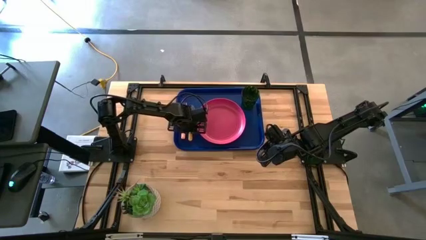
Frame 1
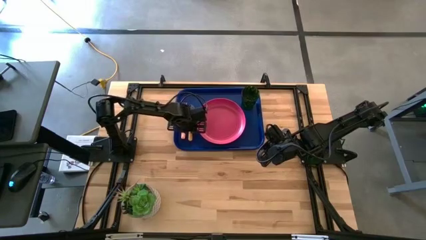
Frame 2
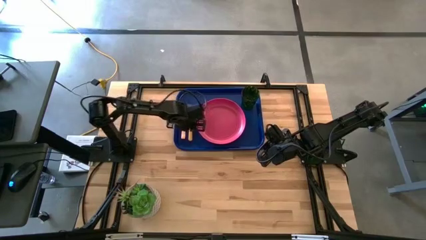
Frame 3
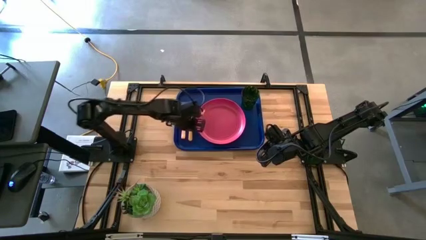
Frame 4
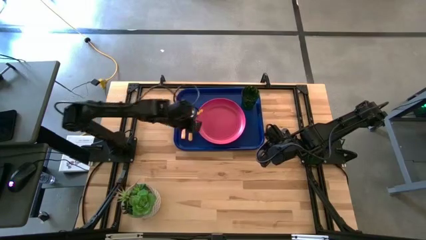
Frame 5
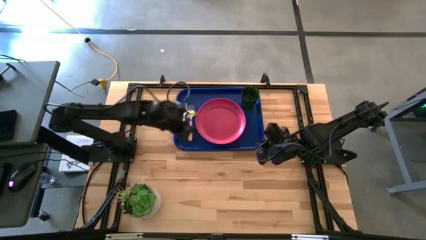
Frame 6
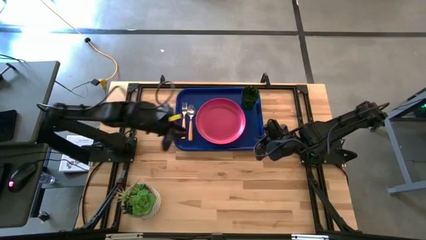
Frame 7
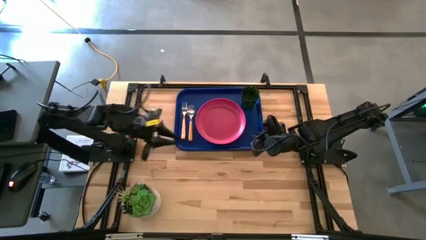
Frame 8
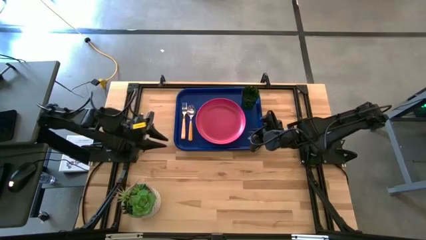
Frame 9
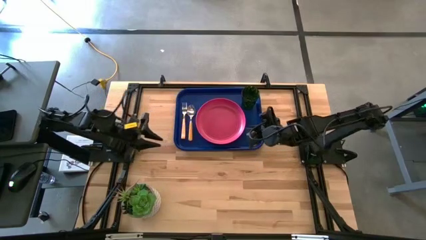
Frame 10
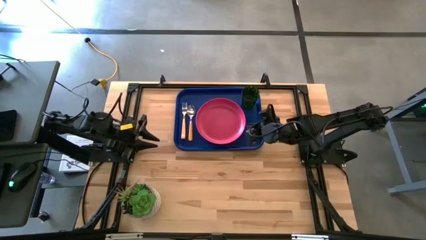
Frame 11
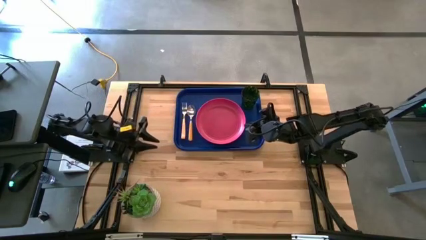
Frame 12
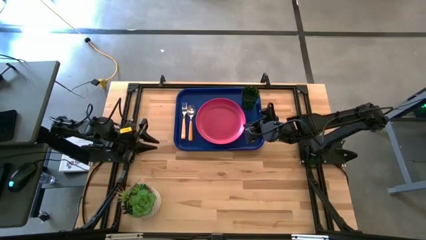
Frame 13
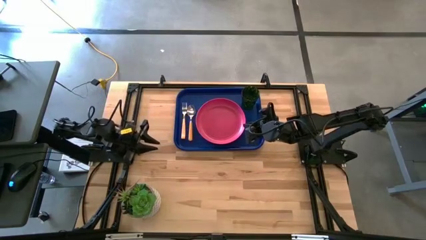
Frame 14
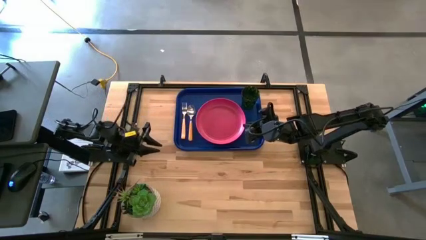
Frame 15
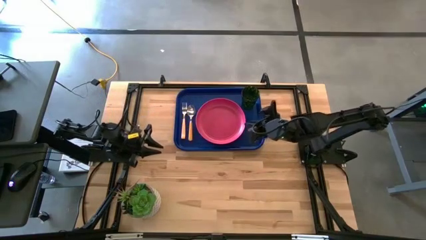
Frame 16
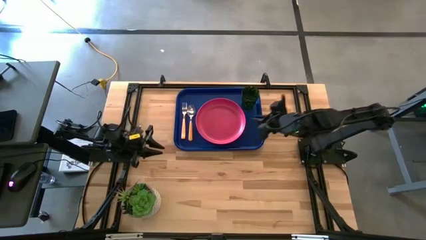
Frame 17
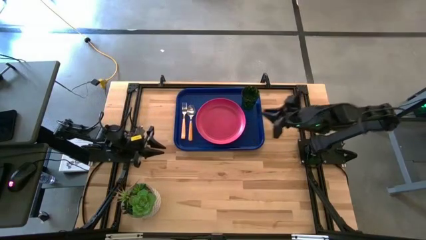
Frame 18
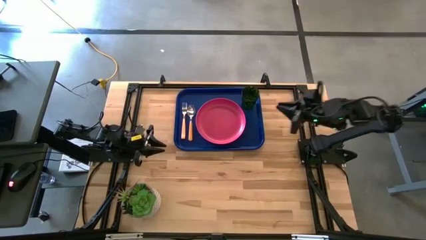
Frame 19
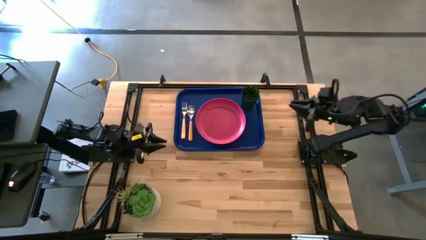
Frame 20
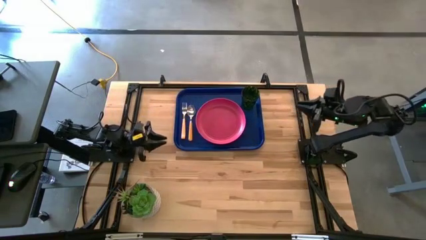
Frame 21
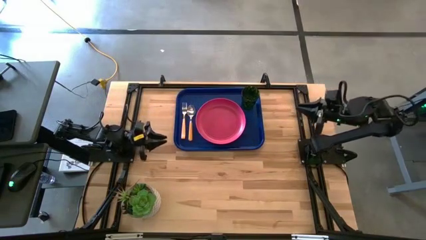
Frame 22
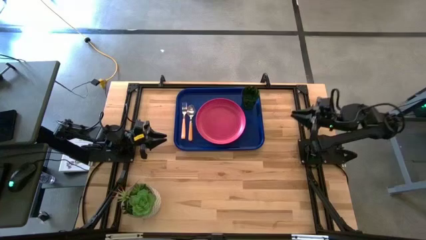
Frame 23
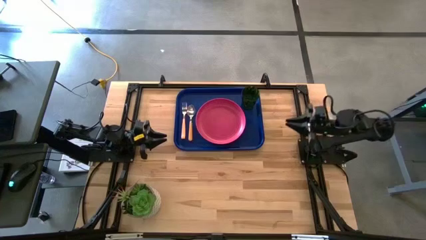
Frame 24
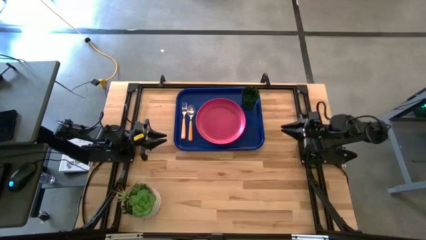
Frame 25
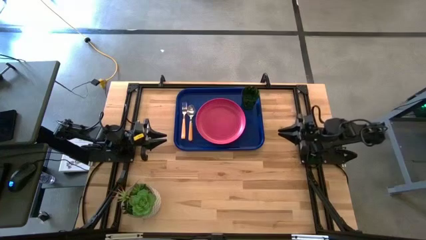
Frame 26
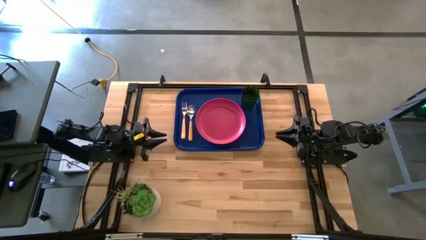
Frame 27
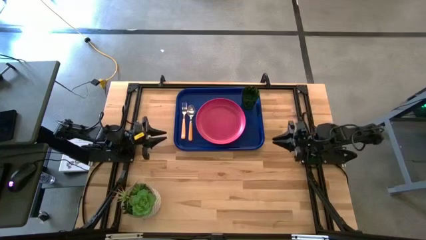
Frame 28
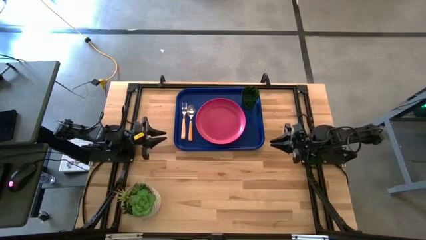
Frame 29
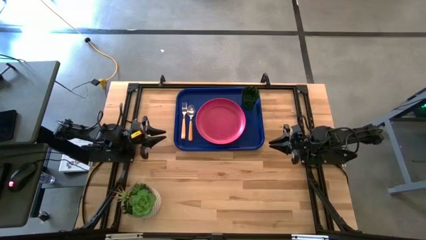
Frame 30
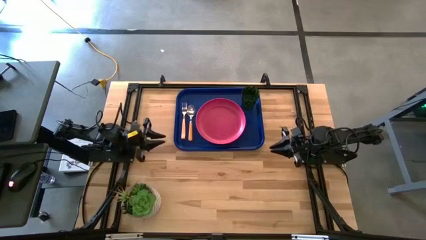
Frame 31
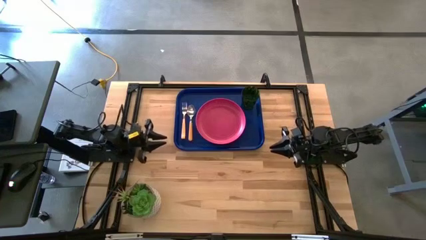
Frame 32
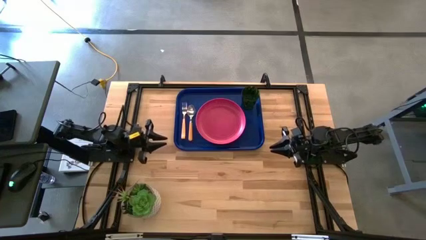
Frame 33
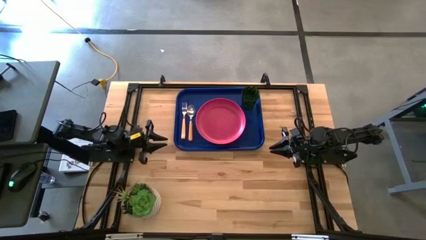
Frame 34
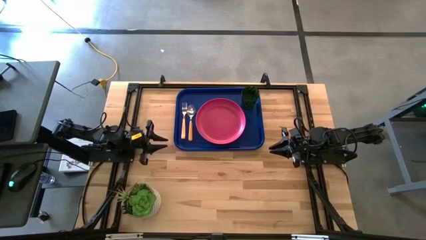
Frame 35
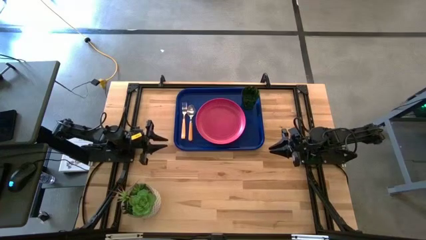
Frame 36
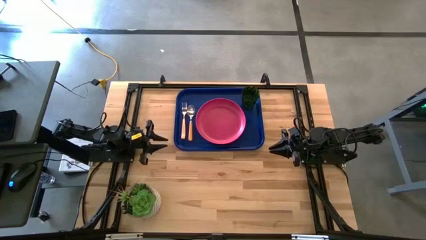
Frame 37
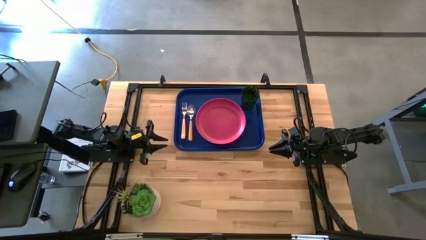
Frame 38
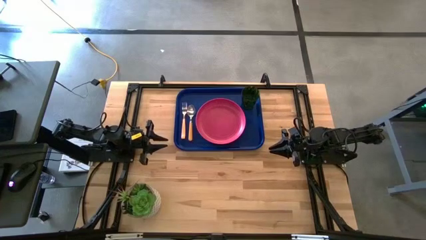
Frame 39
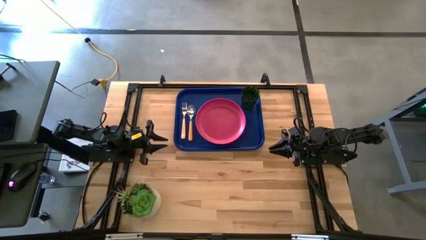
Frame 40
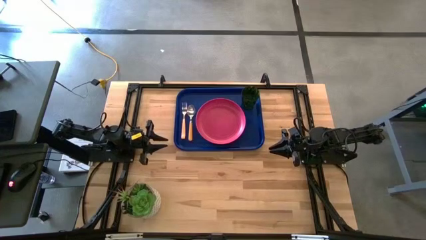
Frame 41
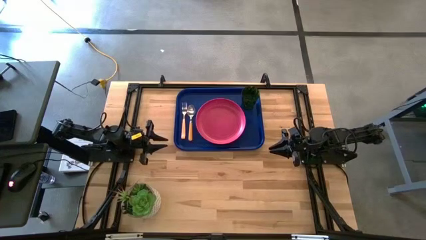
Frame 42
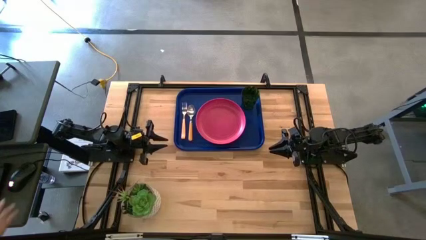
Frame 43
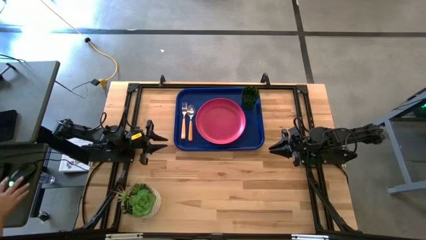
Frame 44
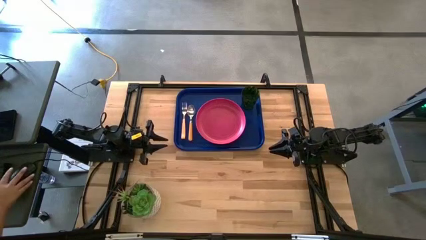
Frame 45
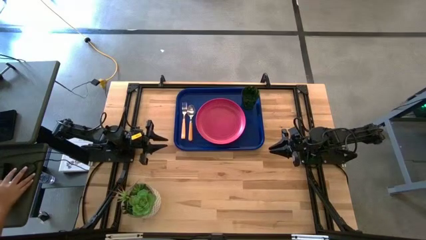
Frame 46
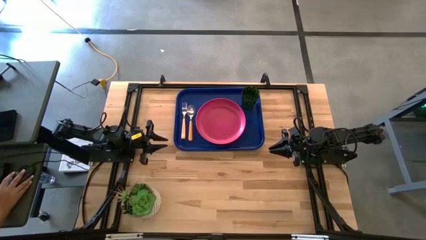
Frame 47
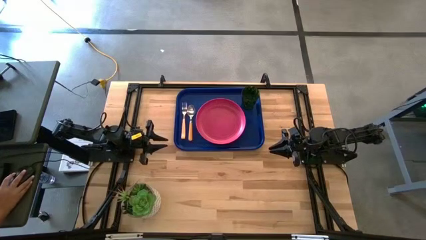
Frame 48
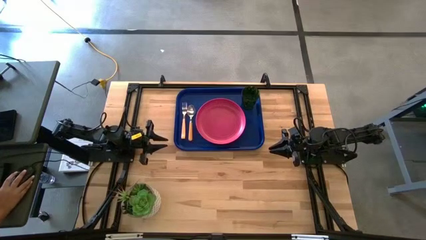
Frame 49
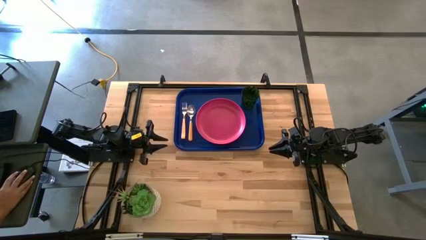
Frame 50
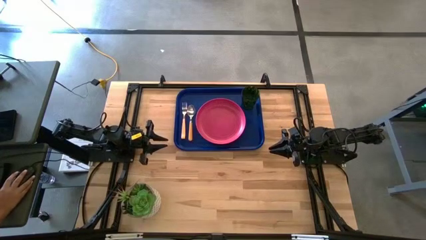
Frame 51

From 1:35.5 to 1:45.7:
Task: Pick and place plate/cup/fork/spoon on tray
Return to Home Position

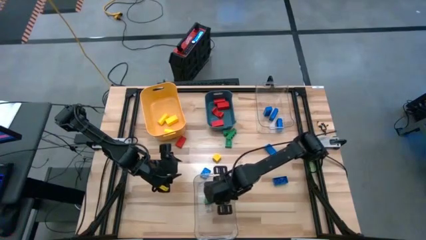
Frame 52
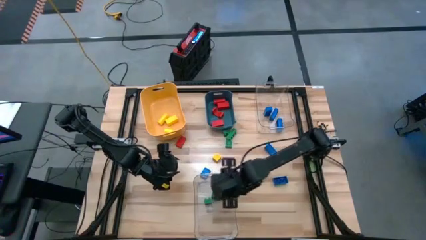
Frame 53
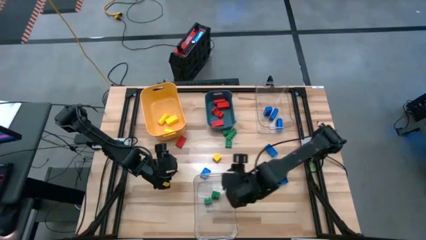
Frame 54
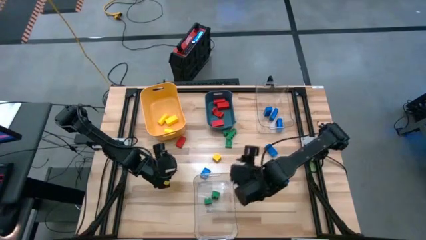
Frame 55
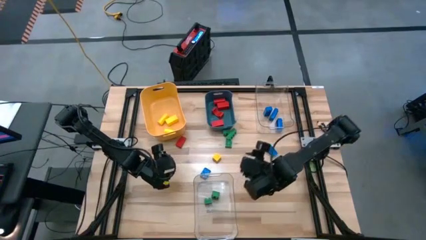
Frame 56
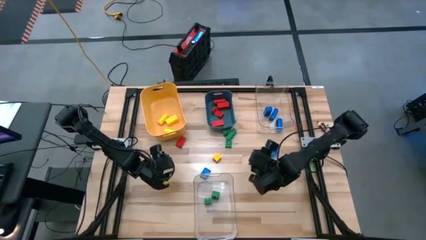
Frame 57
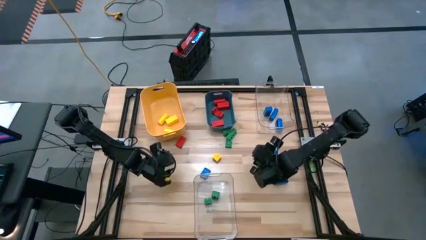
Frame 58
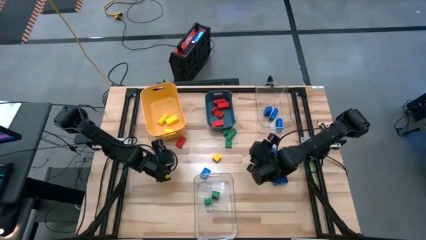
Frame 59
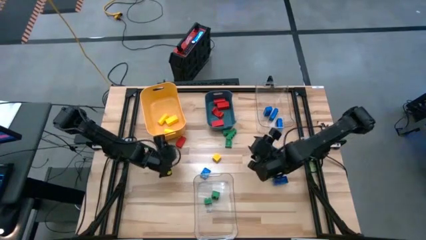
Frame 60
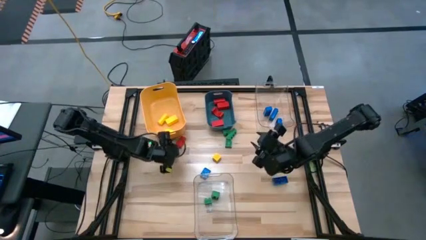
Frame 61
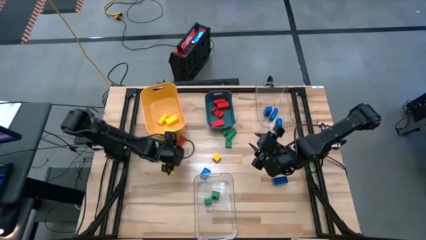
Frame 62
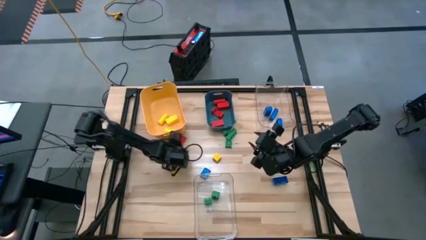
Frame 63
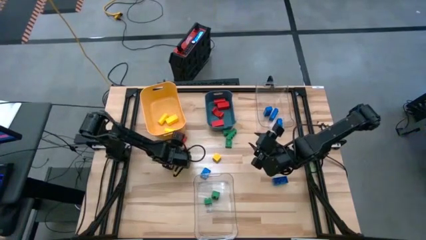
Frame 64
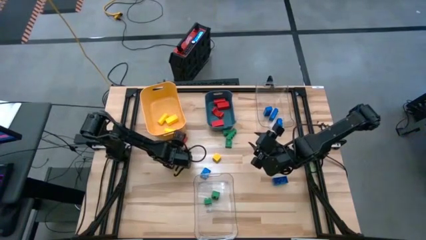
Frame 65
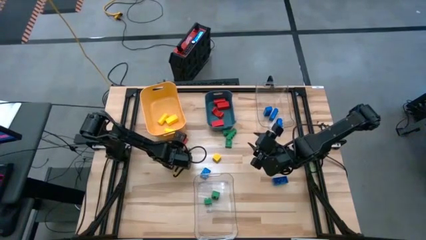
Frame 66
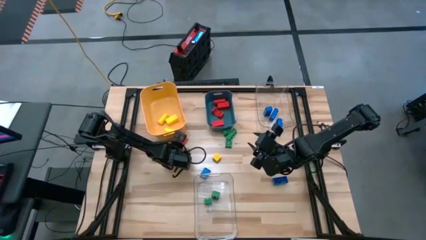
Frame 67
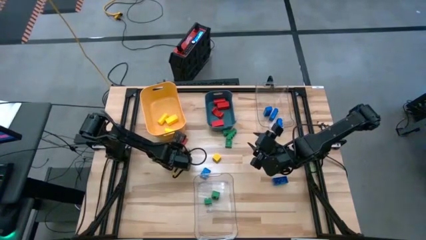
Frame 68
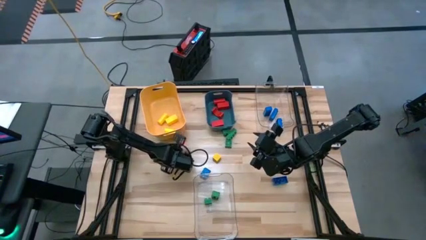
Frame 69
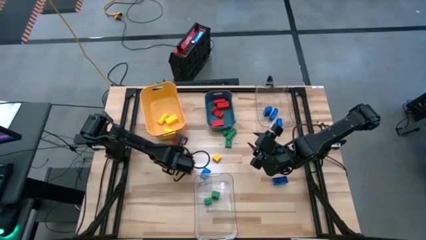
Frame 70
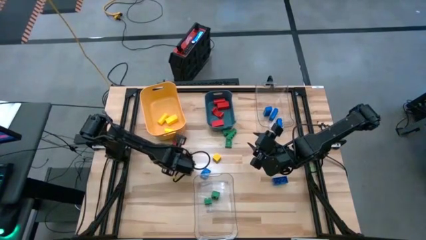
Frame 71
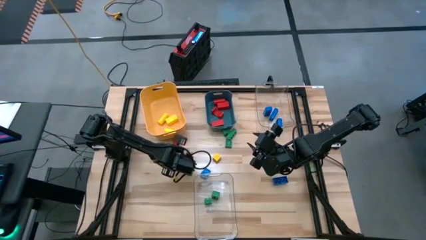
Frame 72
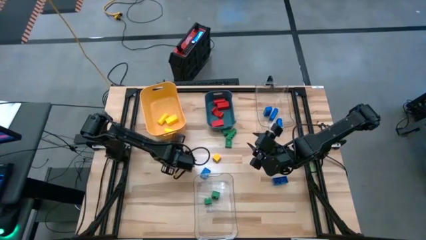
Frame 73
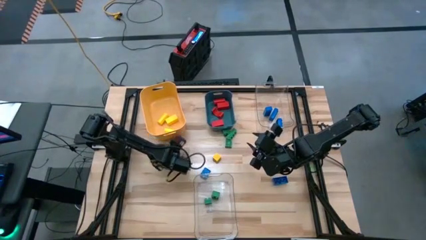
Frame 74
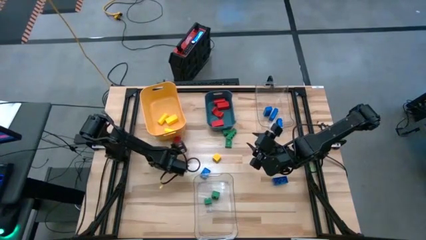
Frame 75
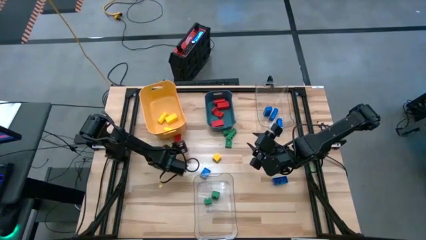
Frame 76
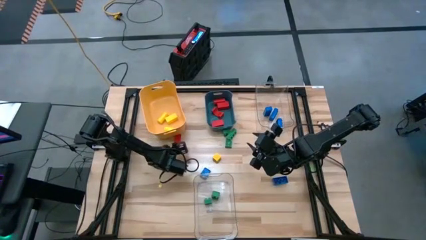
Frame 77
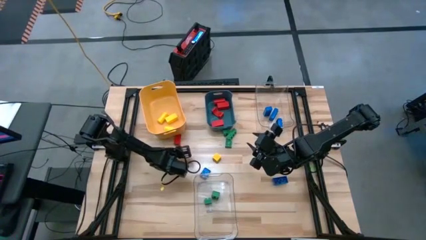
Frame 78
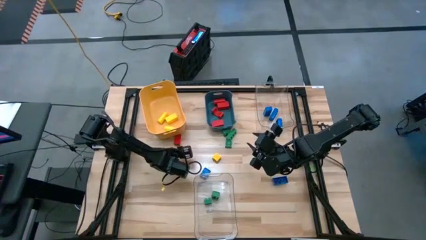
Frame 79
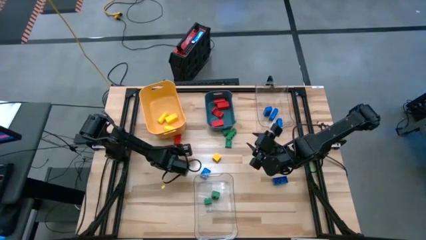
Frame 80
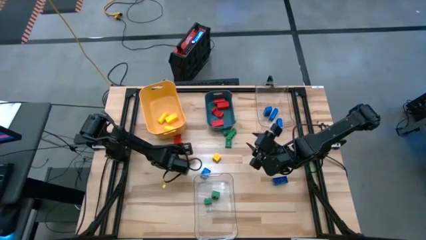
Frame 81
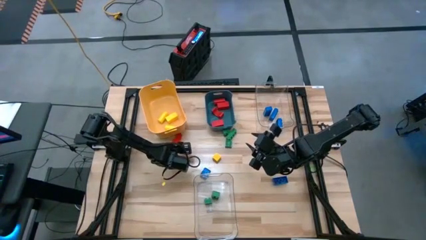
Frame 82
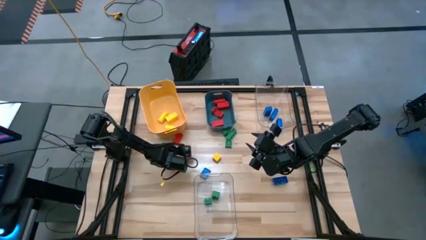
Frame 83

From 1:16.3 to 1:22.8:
Task: Sort blocks
Put the red wooden block into the blue bin
